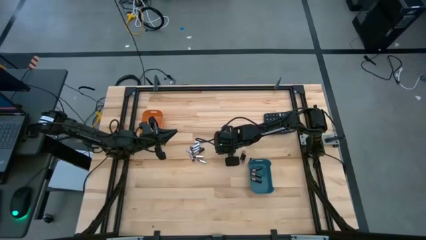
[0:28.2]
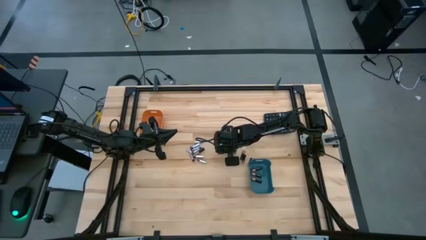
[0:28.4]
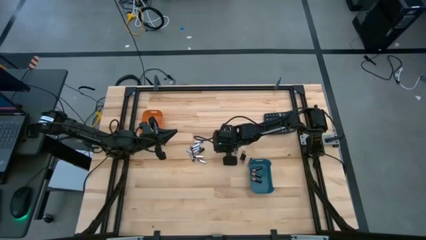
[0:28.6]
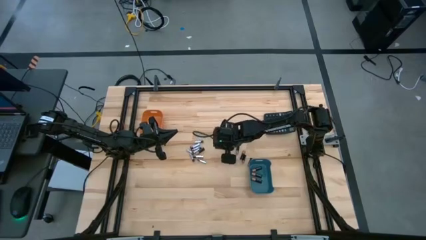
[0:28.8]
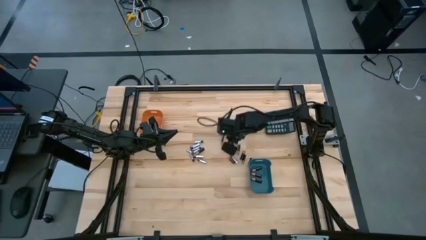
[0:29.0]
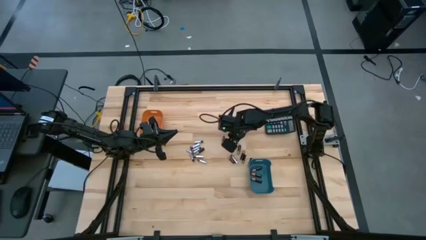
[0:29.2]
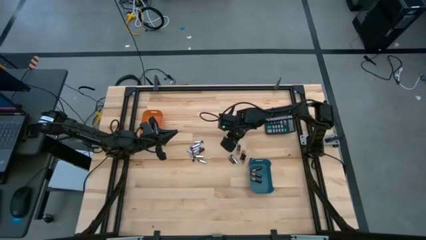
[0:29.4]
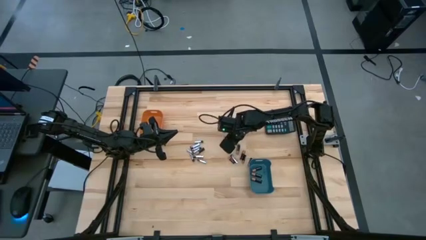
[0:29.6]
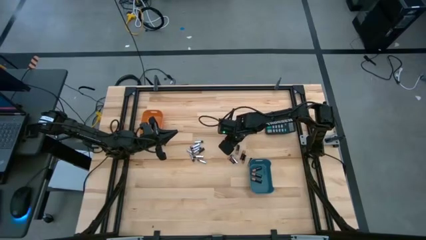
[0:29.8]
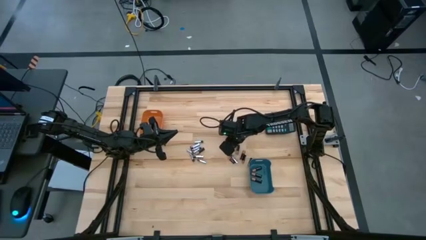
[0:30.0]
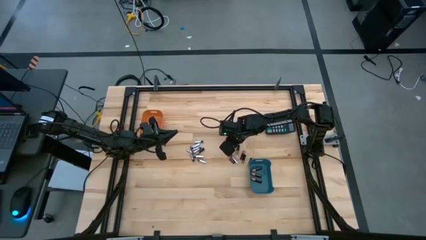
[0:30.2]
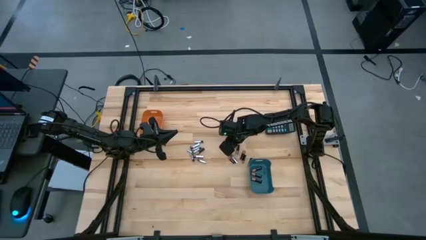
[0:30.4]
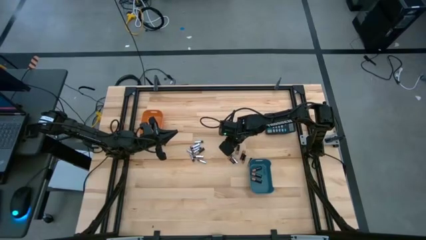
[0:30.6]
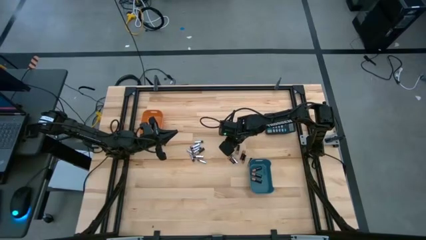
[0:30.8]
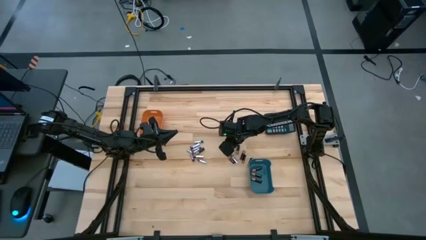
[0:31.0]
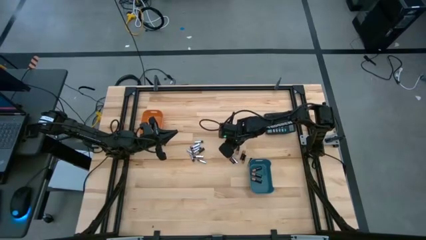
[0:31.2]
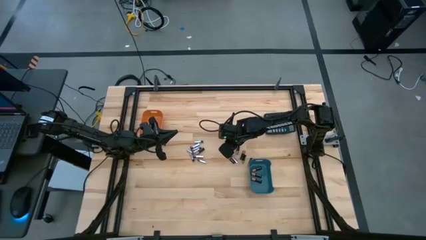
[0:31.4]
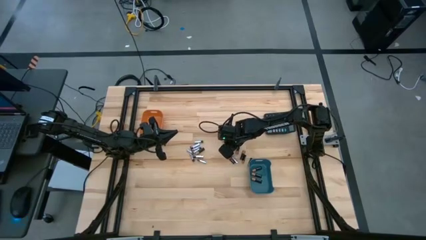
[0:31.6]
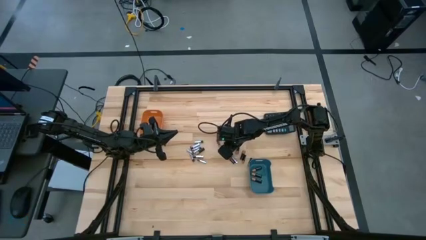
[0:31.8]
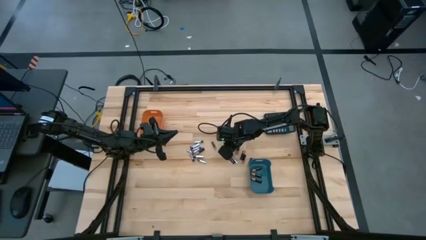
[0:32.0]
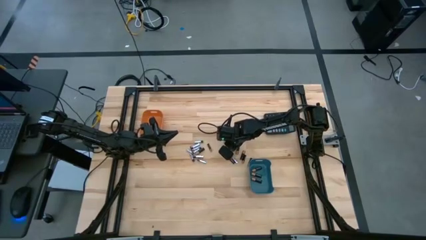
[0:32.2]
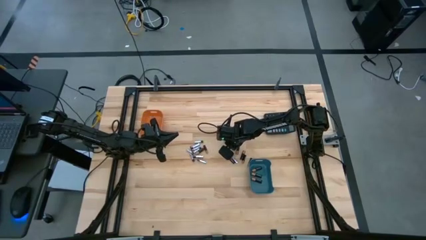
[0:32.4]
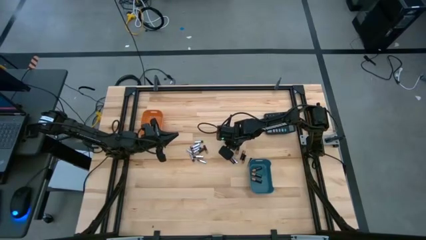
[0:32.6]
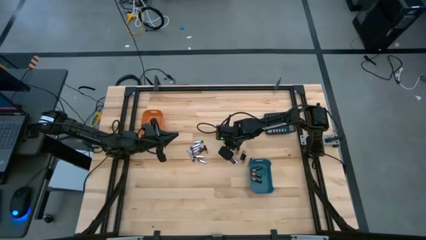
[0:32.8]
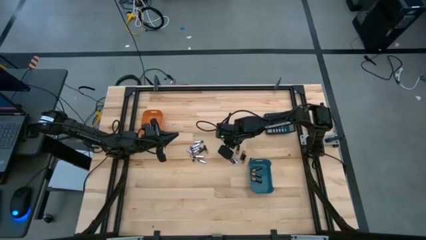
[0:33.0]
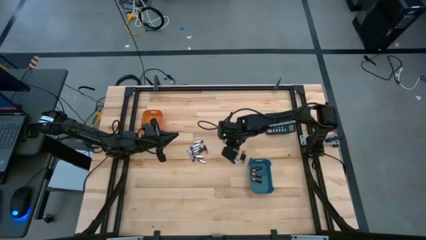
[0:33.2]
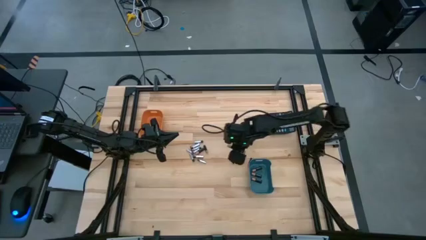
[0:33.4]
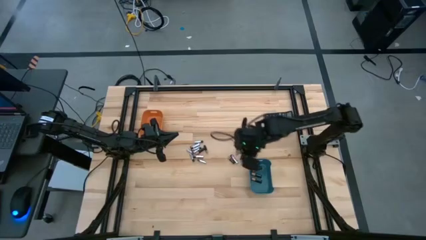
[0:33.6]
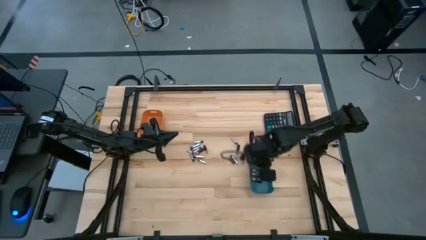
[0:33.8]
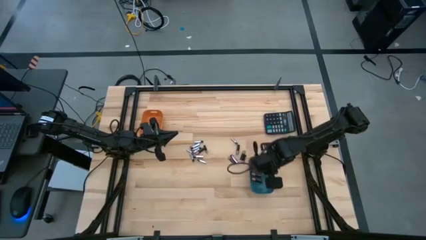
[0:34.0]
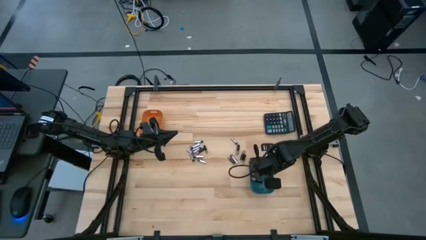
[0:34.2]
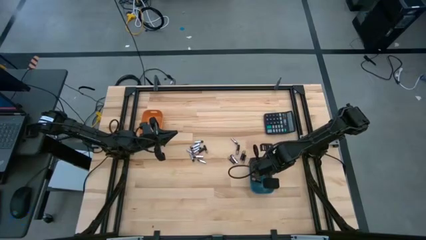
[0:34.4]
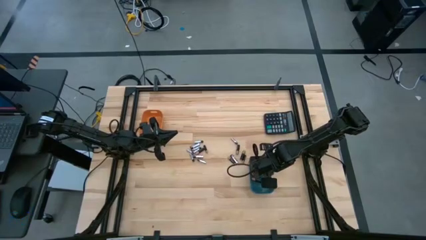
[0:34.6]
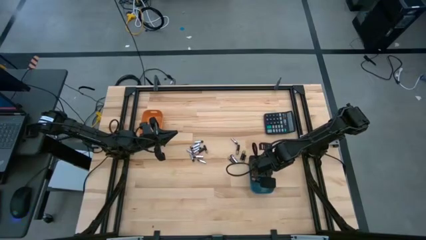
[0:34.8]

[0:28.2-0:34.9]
Task: Sort batteries
Put the black battery into the blue bin

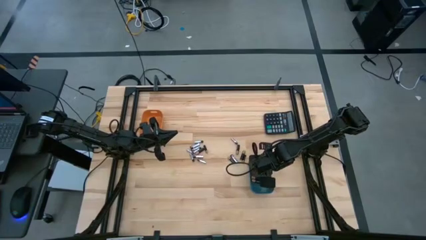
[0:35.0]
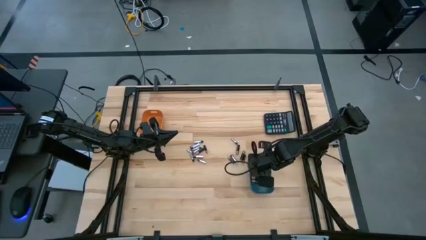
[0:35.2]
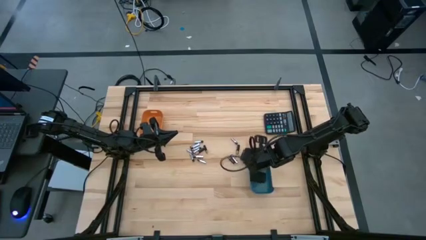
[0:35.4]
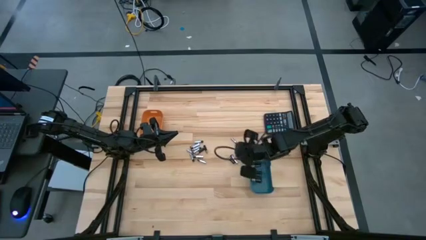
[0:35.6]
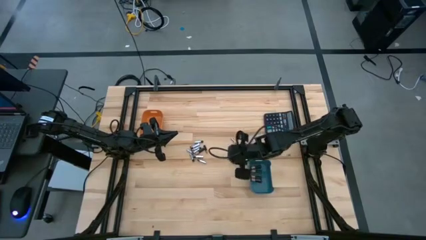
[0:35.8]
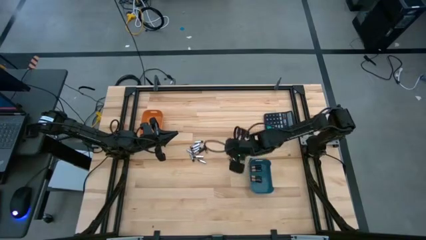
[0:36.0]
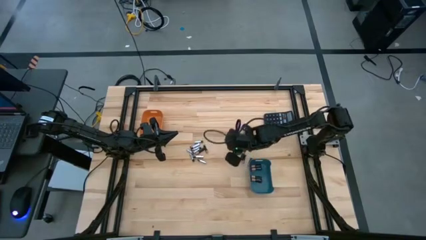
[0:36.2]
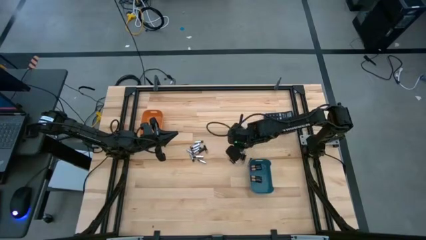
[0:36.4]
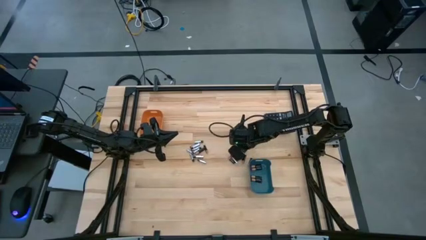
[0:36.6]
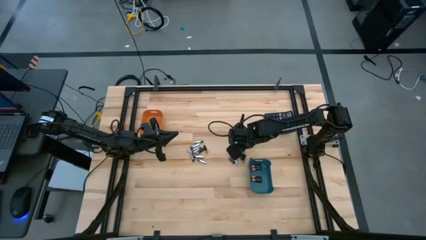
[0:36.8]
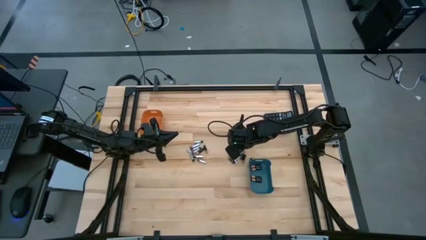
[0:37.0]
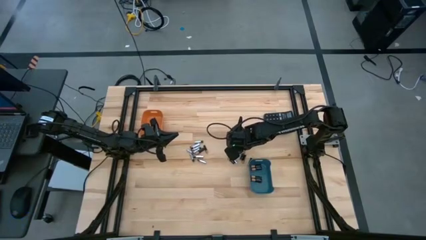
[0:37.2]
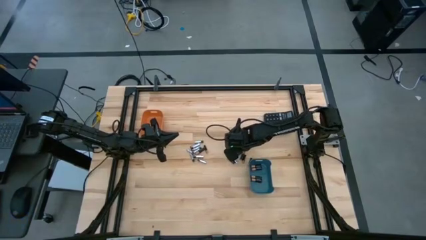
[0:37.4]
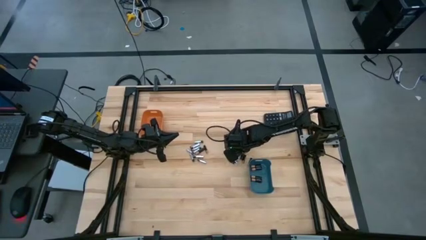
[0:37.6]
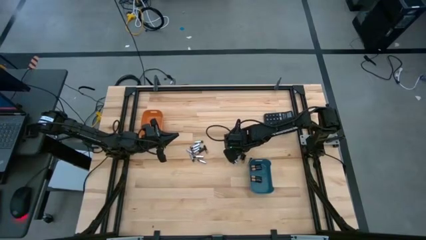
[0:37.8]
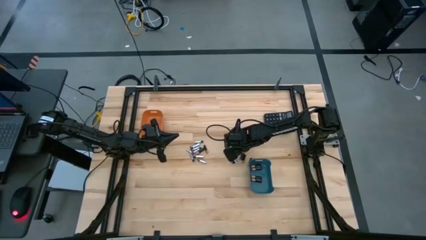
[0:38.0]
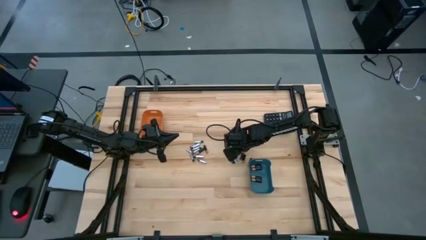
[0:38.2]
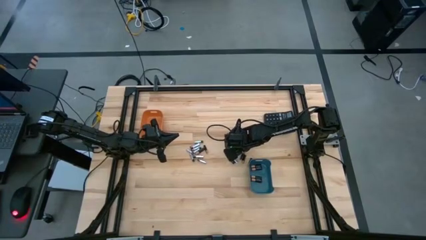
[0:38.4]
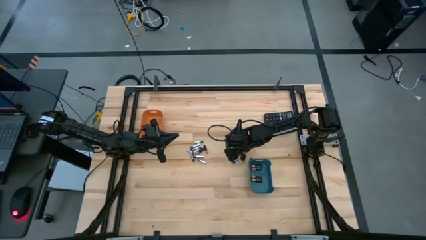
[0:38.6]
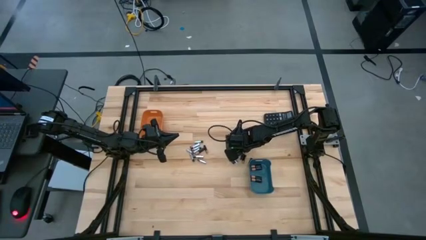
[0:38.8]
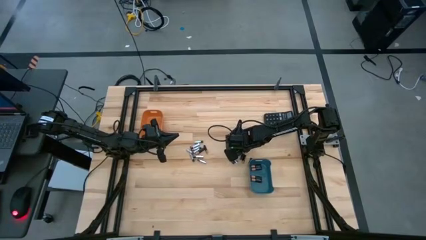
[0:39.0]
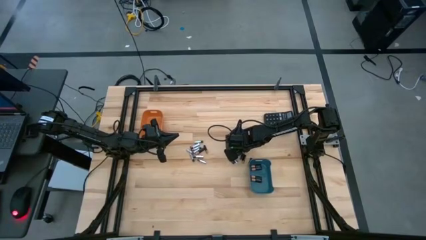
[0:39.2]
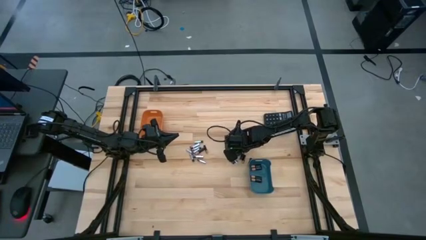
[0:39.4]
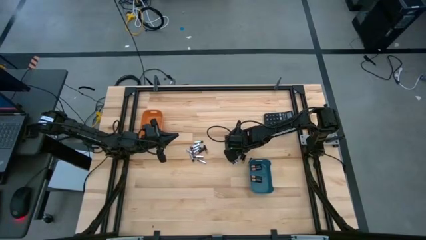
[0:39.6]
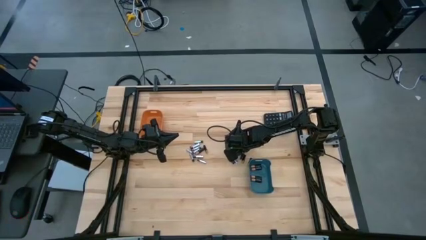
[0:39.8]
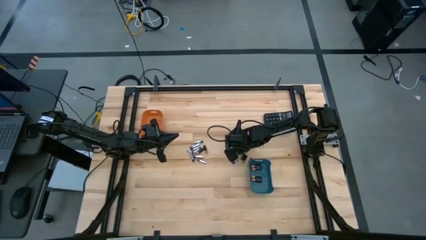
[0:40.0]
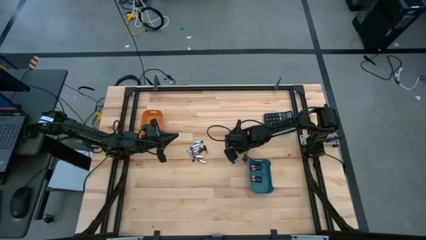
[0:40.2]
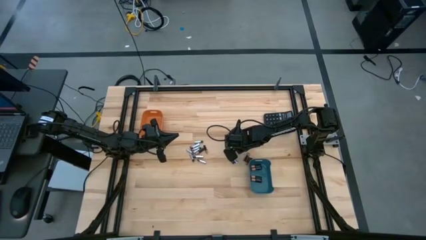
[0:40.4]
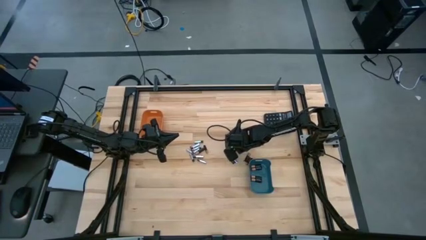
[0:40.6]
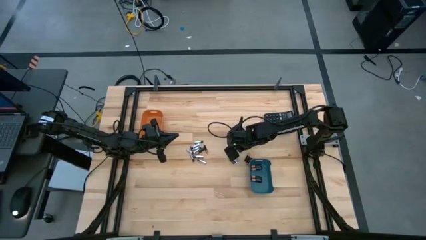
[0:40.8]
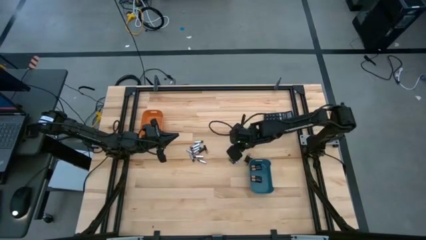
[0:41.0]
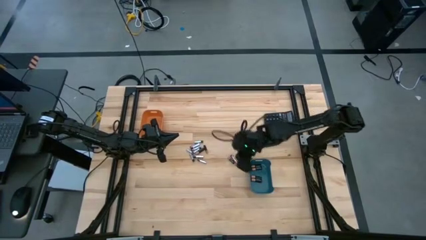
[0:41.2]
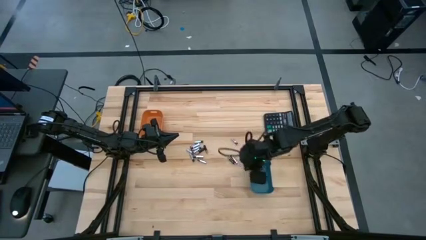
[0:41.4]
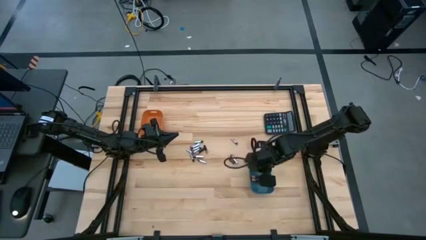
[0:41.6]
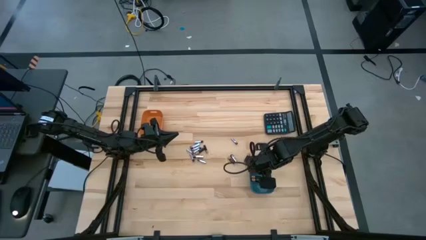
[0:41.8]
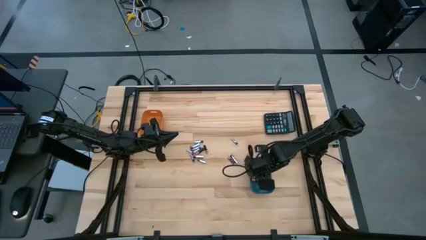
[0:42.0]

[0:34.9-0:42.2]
Put the black battery into the blue bin

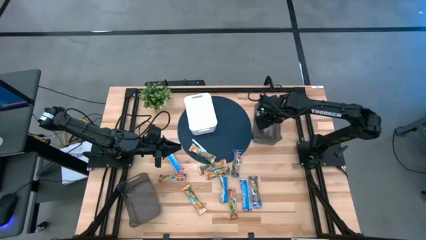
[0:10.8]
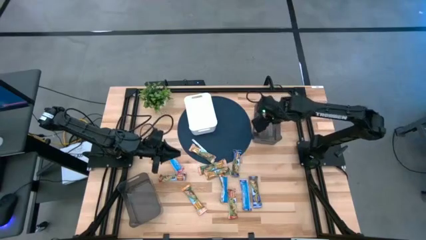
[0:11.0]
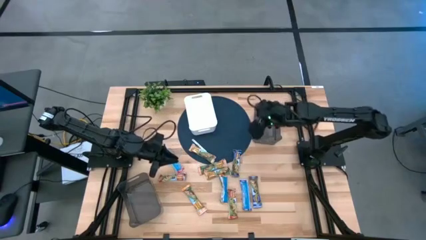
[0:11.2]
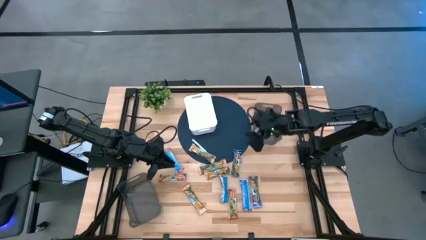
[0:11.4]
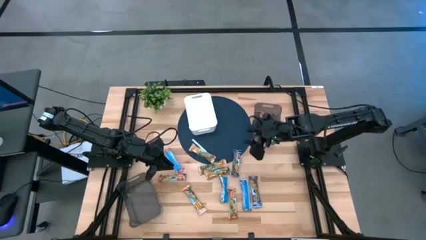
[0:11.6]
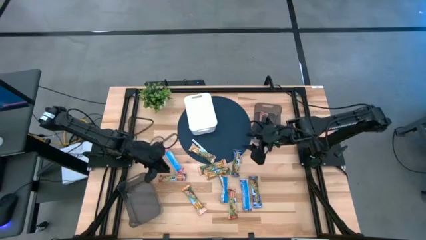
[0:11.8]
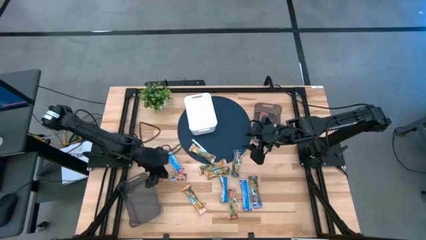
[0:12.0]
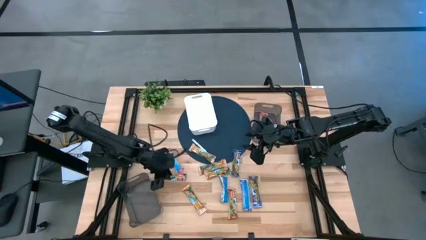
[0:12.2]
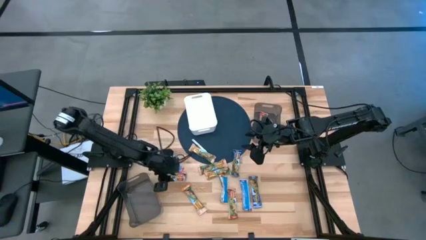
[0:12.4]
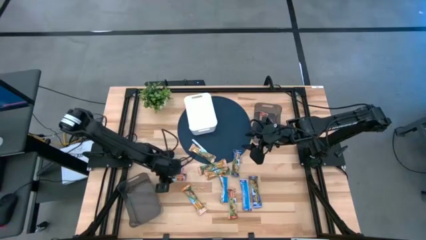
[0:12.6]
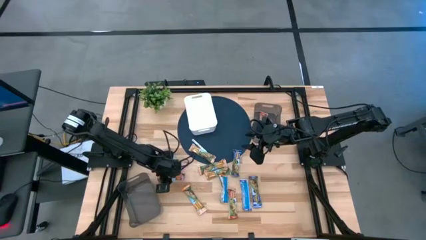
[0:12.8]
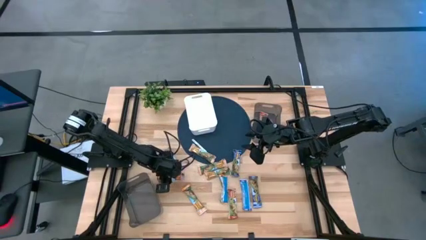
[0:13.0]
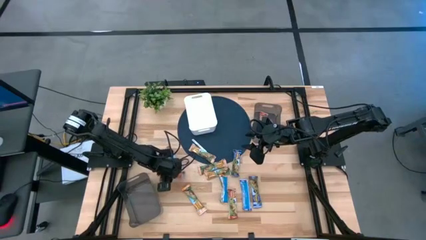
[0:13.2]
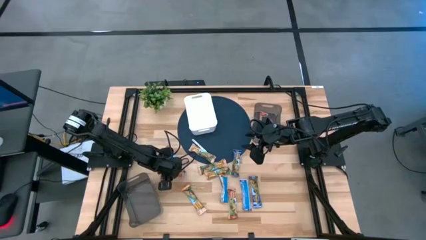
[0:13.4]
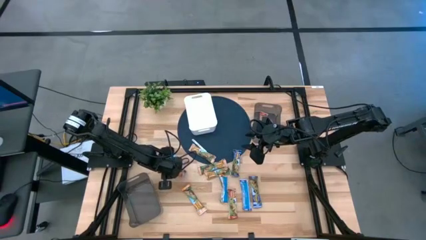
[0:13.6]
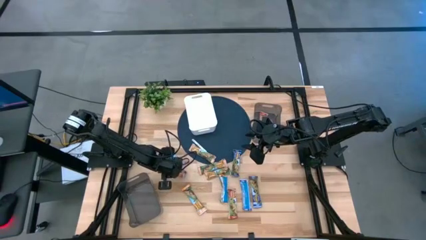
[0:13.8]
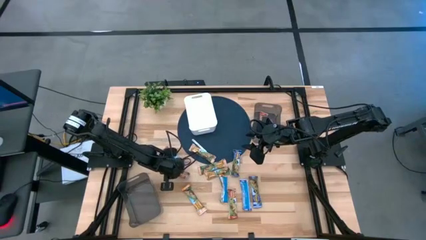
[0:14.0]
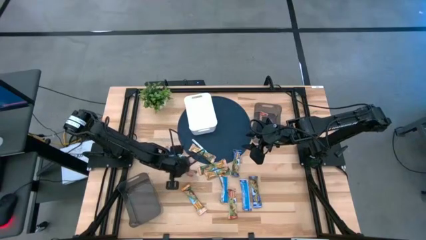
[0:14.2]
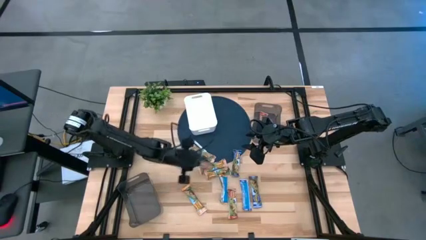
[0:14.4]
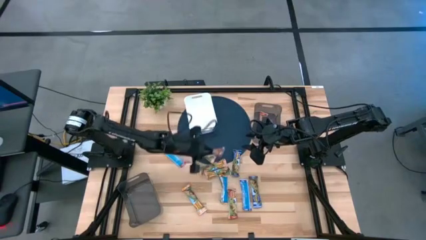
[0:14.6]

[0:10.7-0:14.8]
Task: Pick and place Granola Bars by type
Move the red granola bar to the center of the table
